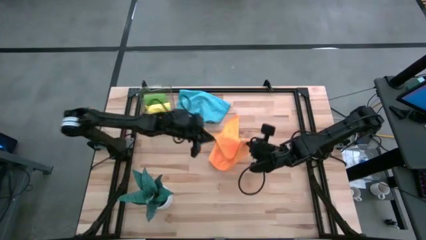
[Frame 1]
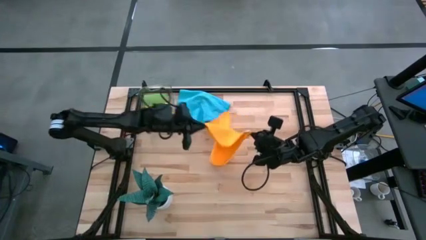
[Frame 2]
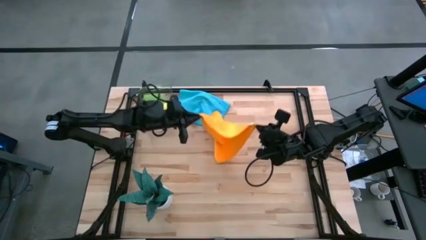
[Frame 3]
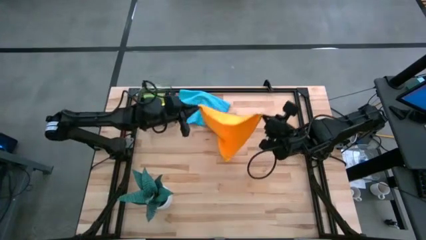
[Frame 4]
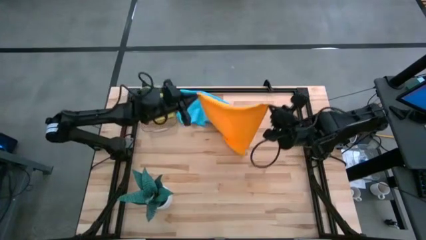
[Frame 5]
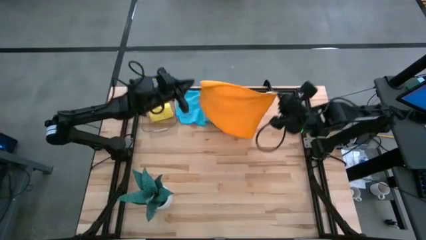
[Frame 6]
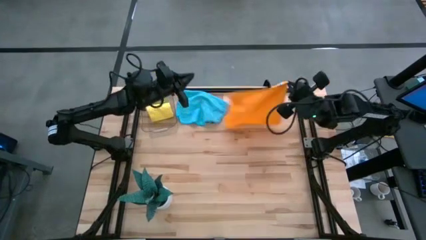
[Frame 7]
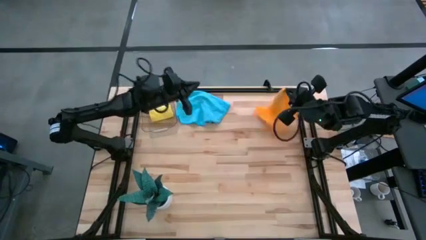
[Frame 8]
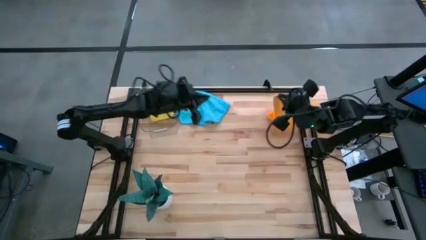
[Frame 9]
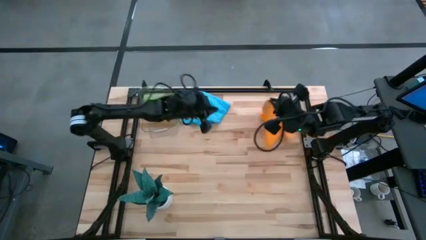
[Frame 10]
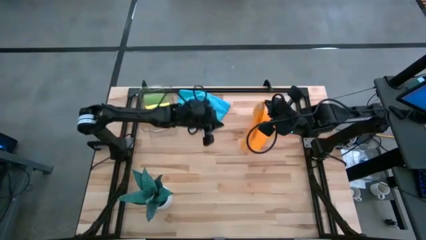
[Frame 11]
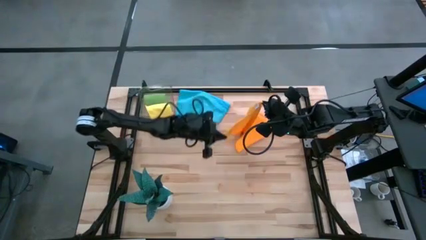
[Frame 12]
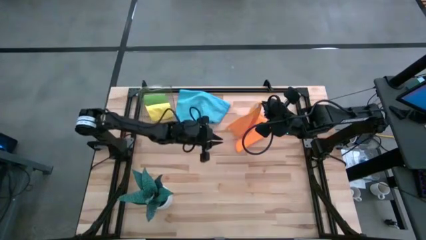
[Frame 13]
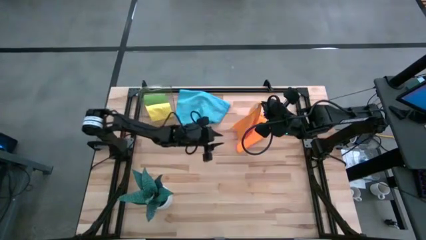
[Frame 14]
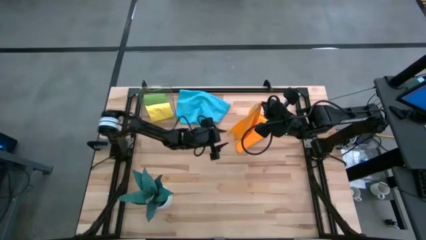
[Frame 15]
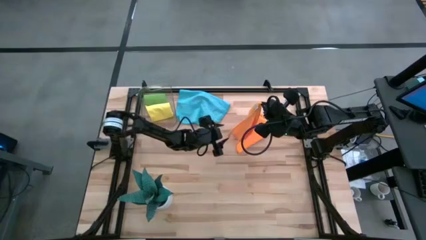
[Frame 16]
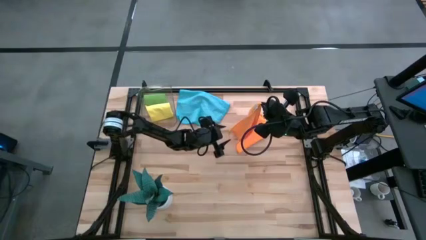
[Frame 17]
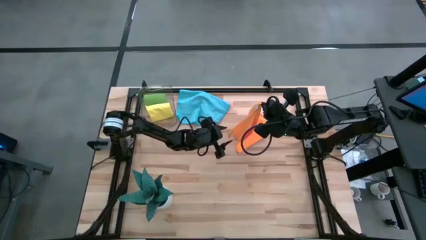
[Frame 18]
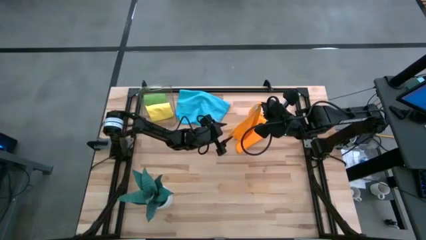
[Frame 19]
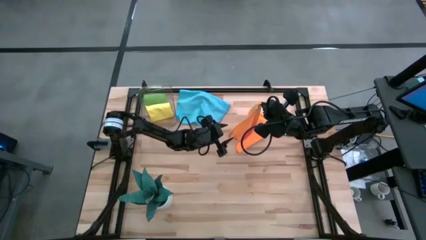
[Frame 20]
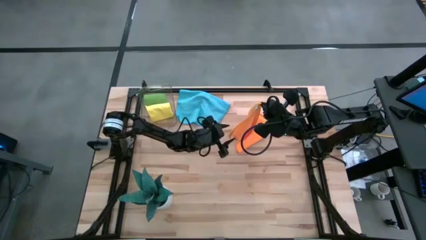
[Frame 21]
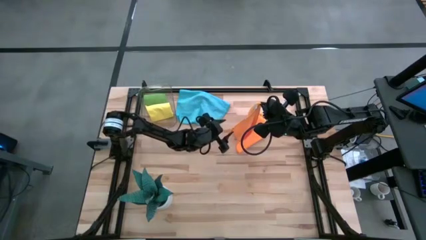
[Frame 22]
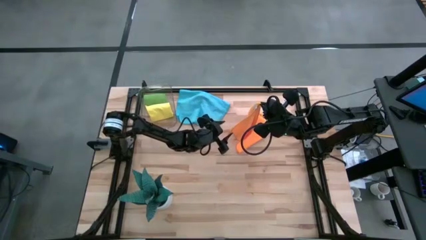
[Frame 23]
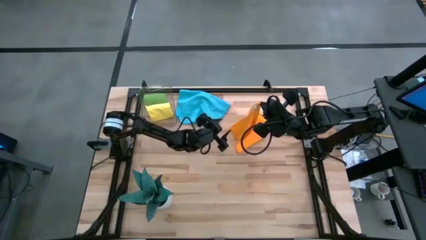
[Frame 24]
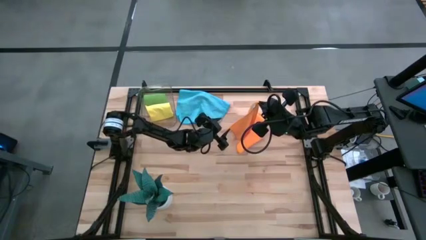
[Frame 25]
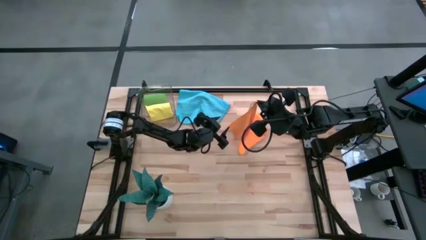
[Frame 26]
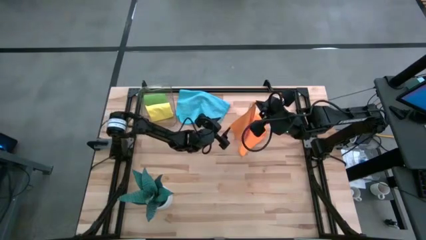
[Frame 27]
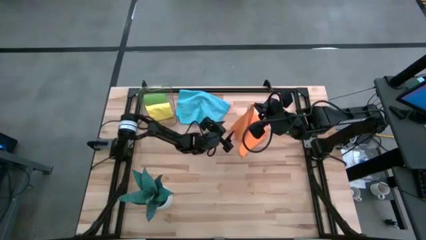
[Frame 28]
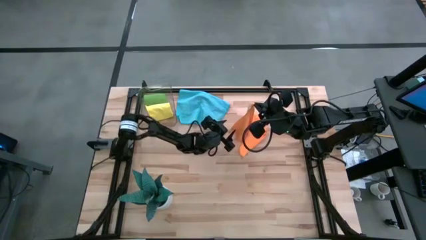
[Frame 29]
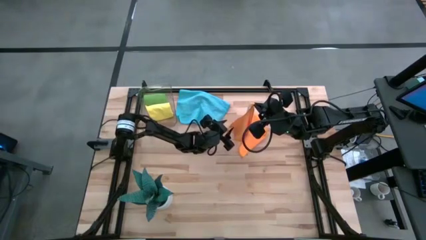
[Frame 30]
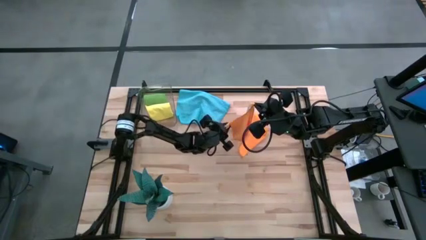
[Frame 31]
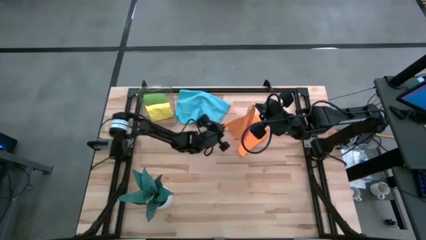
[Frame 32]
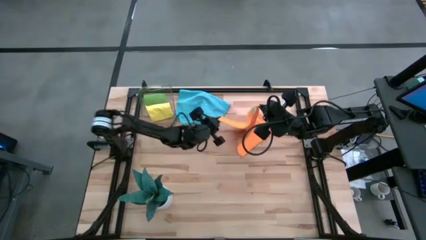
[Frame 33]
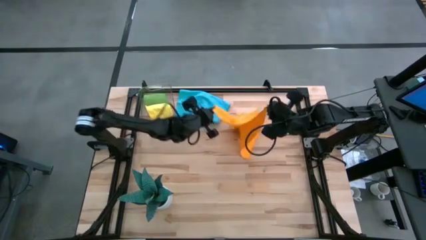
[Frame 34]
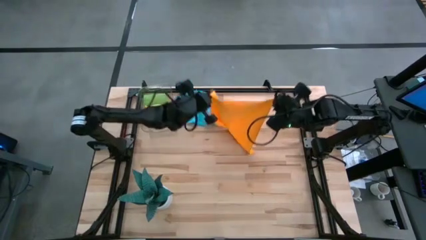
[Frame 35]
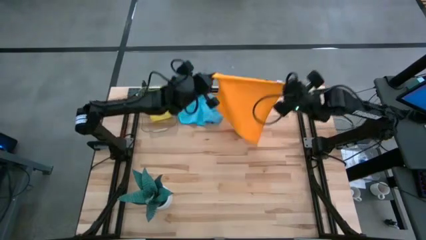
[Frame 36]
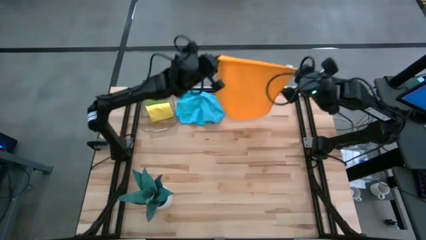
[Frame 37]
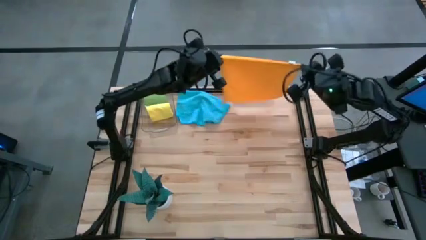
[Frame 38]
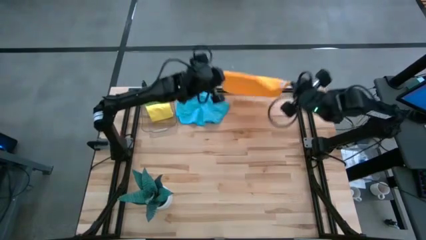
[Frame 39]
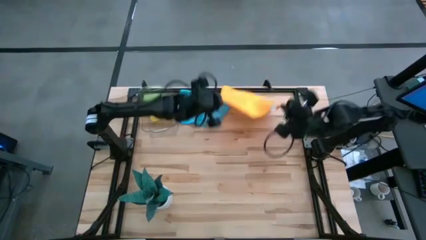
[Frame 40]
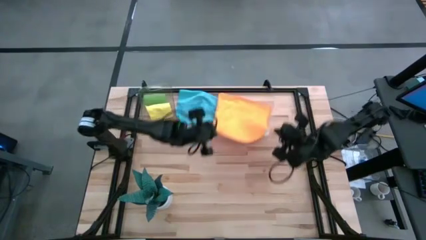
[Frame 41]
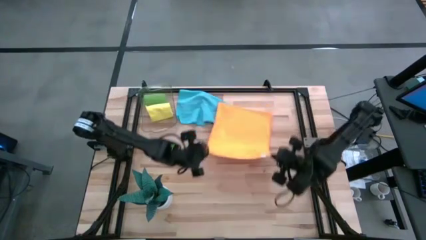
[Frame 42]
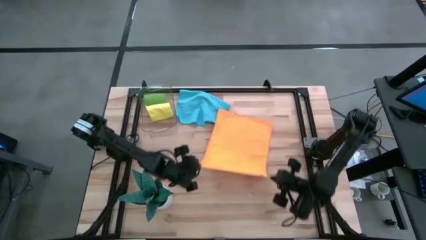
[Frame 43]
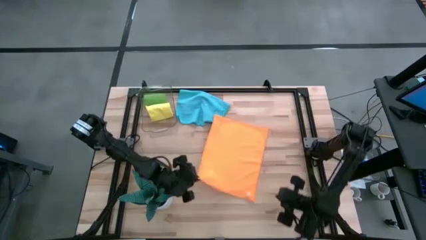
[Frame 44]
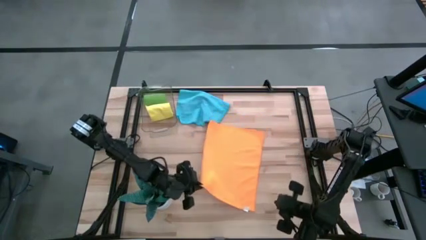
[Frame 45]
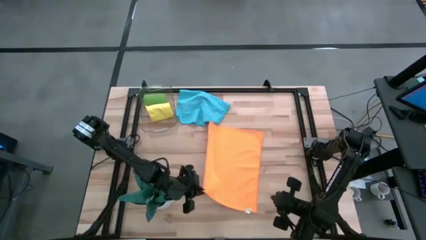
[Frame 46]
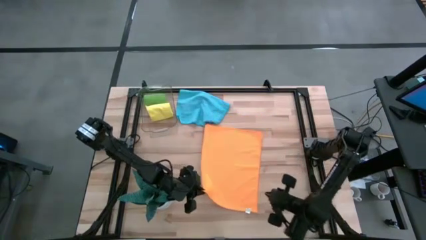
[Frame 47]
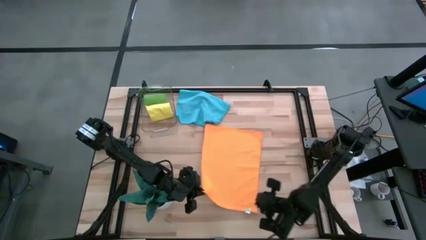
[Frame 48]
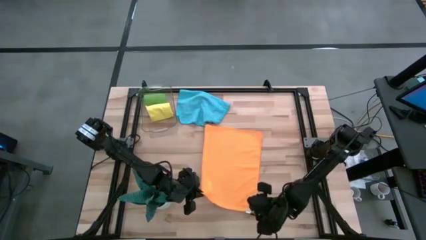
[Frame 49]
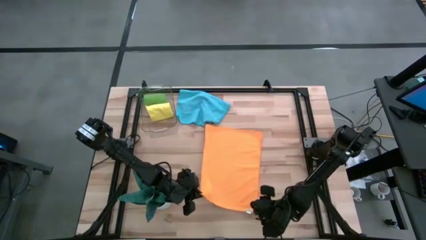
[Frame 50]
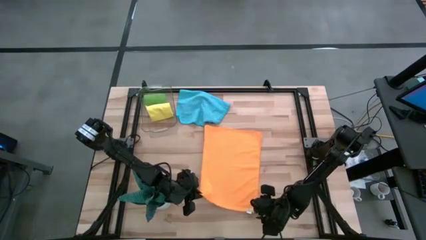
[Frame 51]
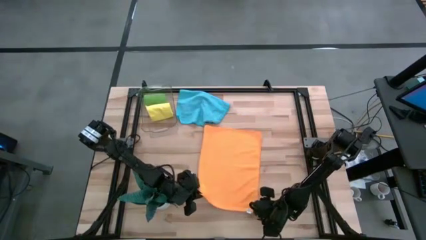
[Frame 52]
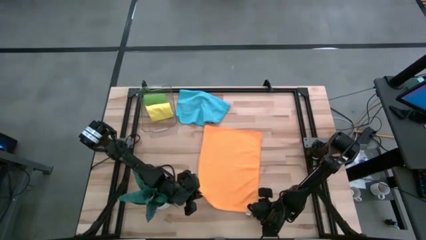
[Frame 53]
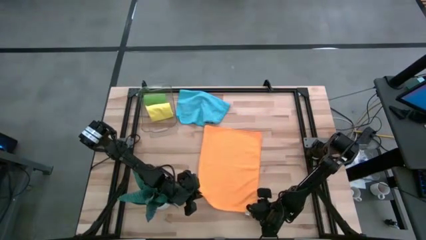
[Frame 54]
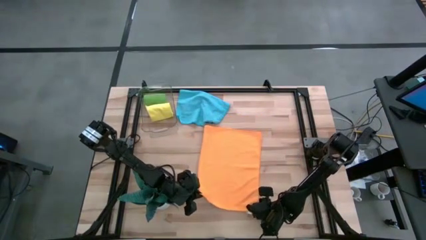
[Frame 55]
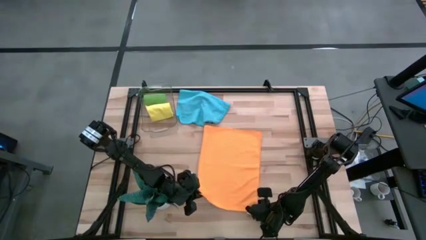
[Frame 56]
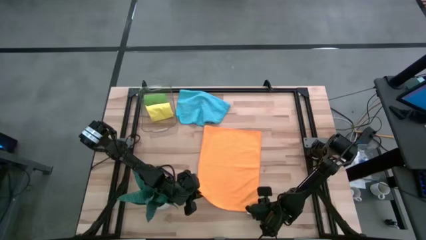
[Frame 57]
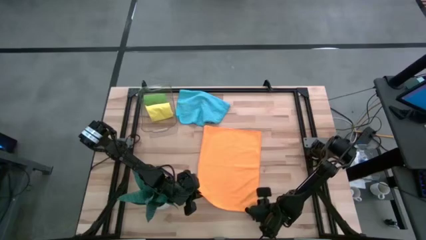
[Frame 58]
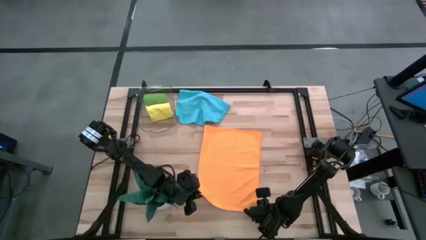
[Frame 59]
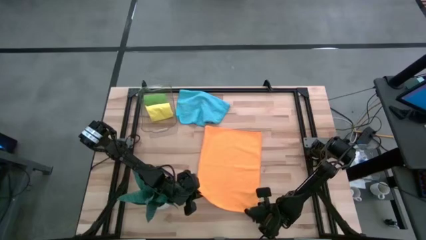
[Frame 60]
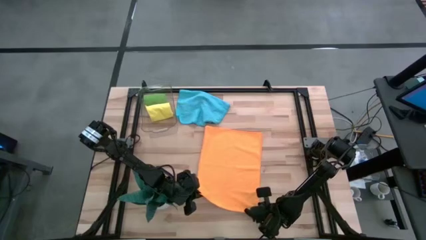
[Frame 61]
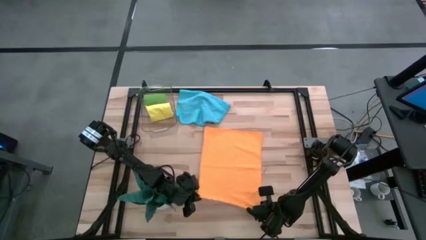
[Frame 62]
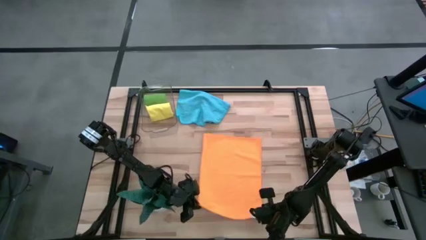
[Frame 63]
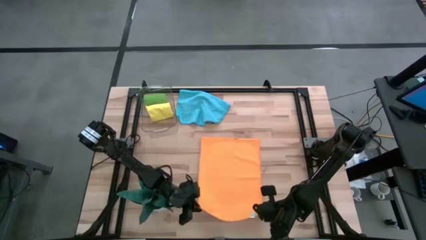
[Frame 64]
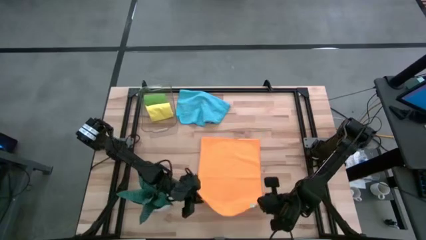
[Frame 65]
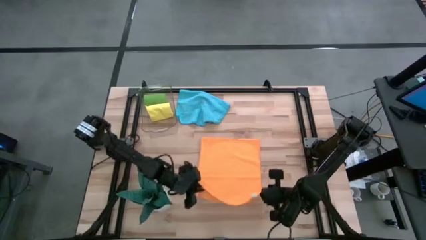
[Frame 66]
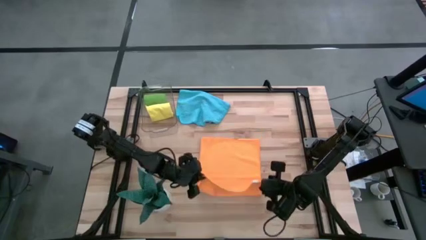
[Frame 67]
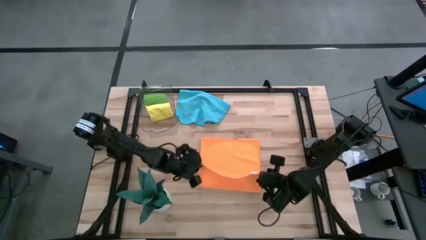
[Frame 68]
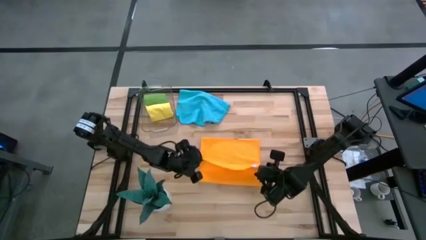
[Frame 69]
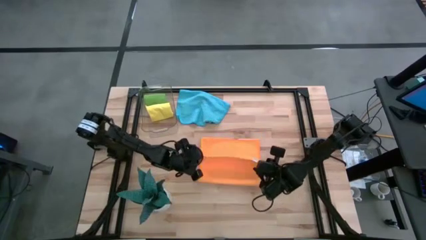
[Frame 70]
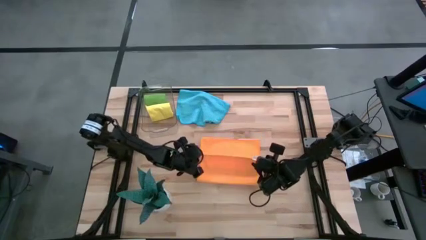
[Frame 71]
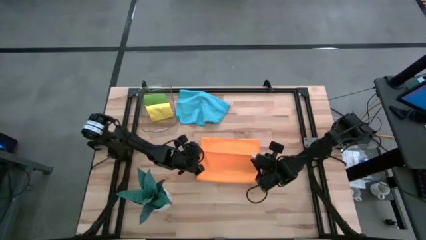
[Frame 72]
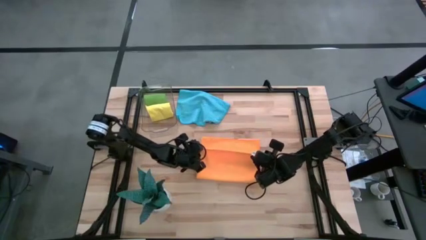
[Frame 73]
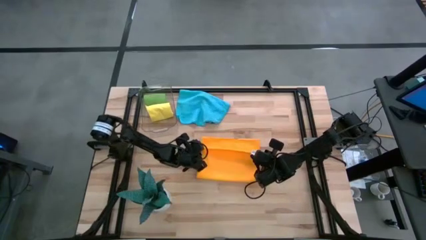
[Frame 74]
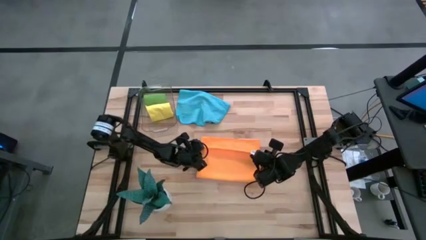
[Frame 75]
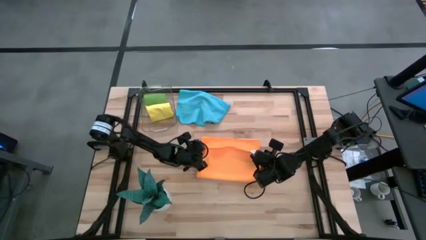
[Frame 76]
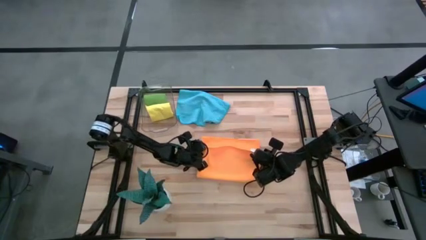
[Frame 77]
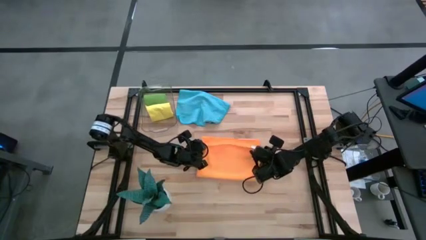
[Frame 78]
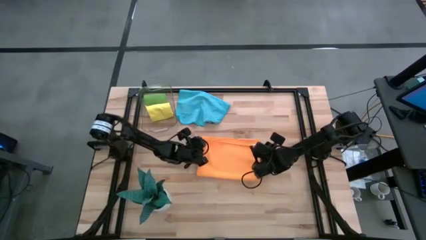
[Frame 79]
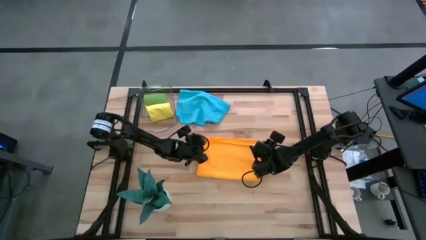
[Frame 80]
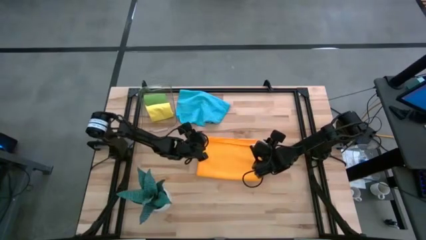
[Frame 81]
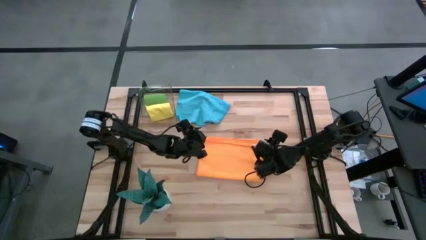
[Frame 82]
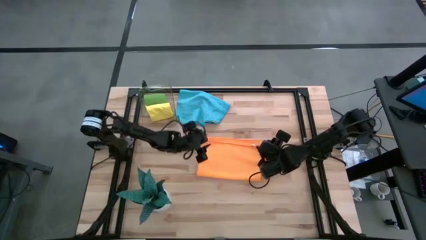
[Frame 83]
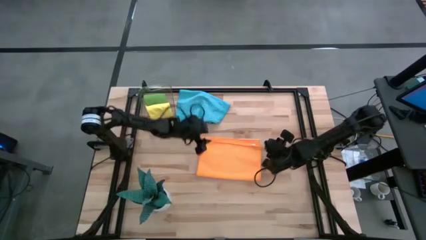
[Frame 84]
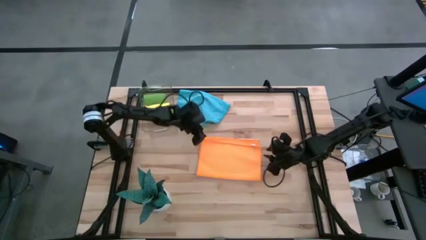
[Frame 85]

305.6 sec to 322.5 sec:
Task: Roll microfiber towels into tight, uniform cylinder then place into a basket
Fold the orange microfiber towel
